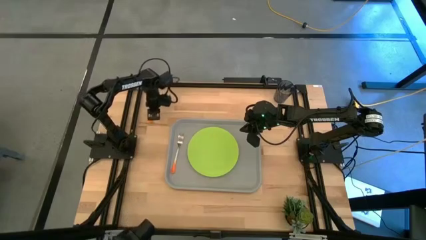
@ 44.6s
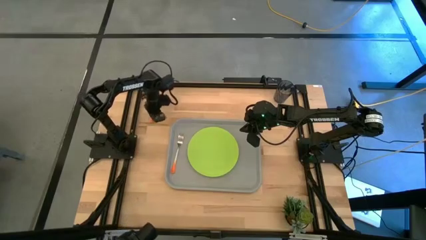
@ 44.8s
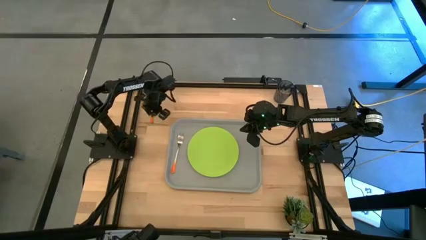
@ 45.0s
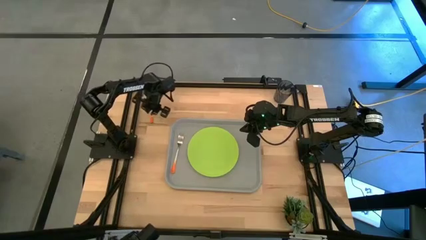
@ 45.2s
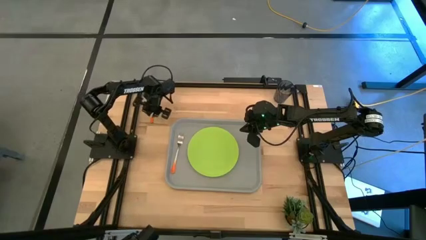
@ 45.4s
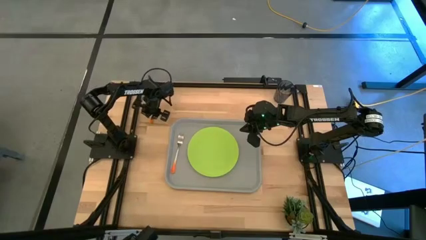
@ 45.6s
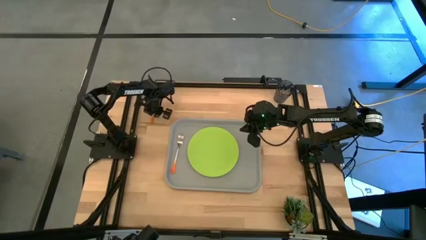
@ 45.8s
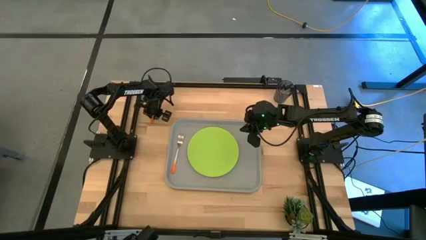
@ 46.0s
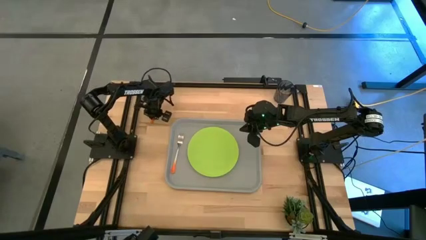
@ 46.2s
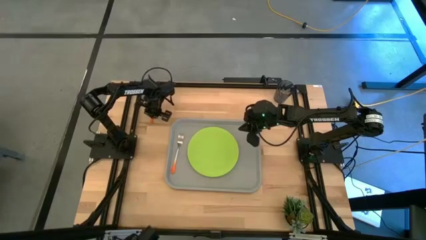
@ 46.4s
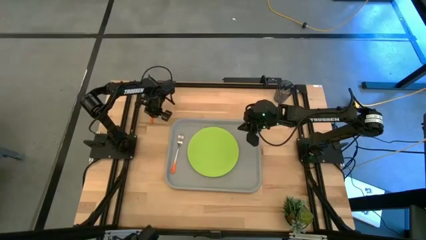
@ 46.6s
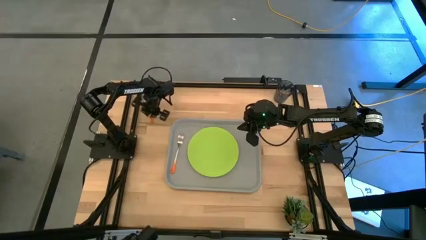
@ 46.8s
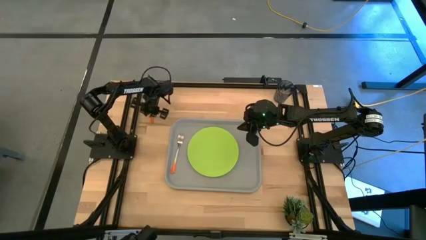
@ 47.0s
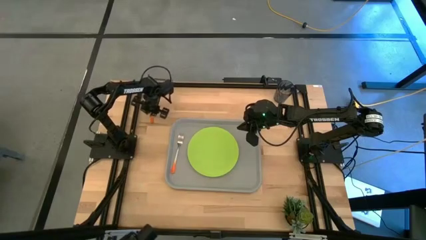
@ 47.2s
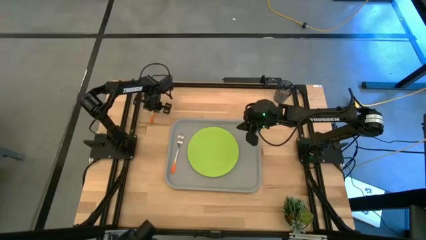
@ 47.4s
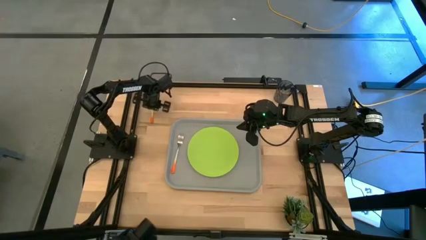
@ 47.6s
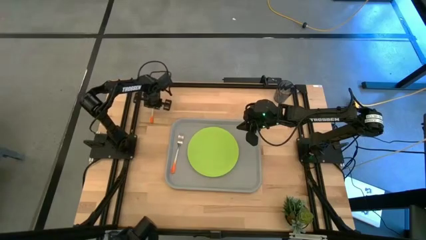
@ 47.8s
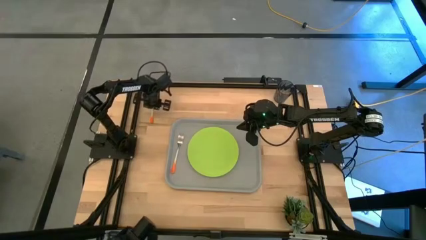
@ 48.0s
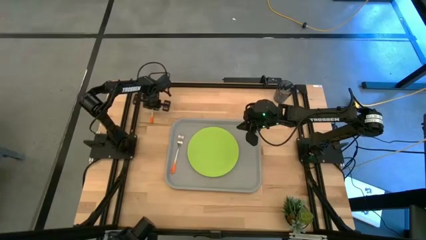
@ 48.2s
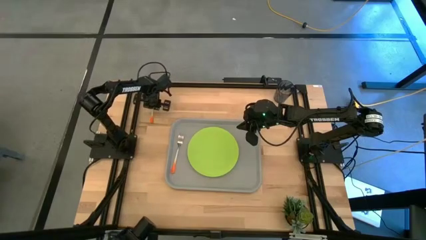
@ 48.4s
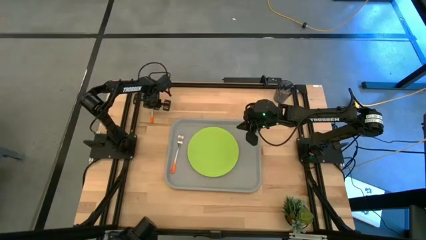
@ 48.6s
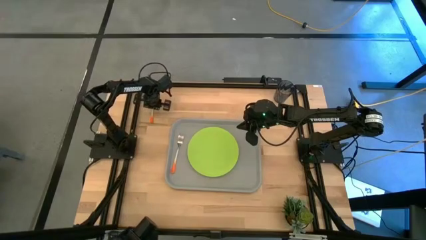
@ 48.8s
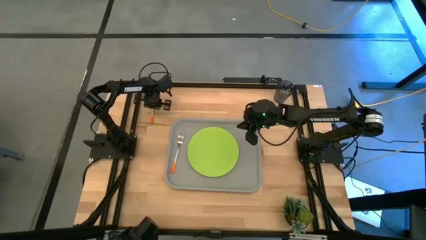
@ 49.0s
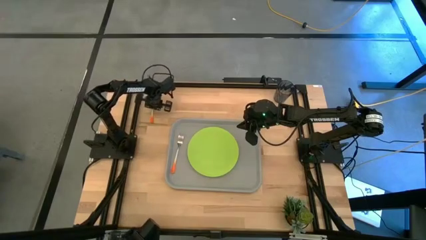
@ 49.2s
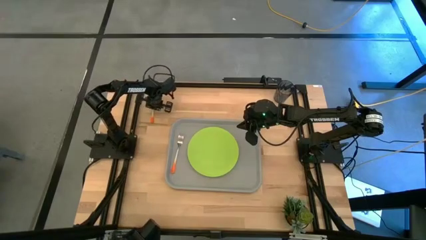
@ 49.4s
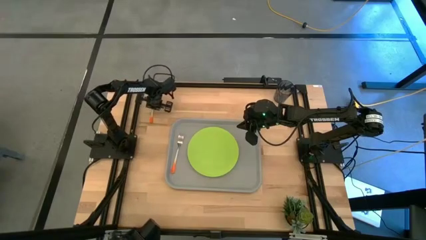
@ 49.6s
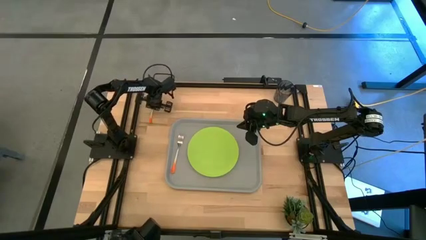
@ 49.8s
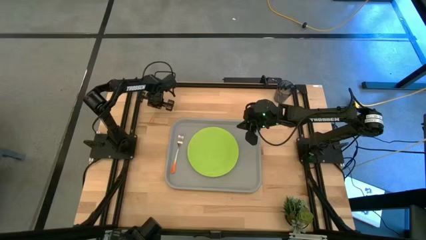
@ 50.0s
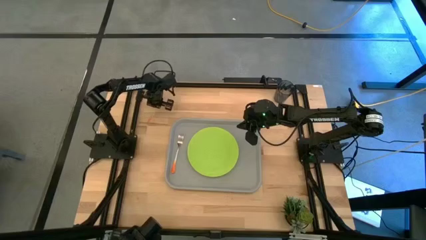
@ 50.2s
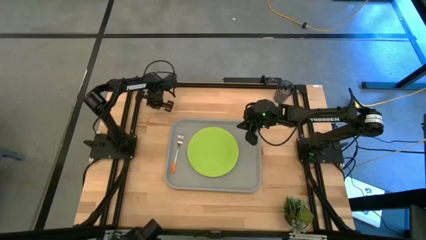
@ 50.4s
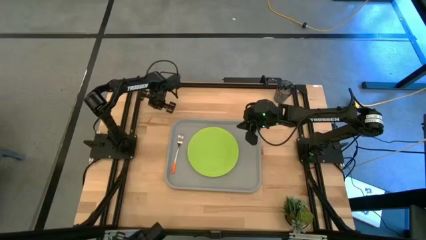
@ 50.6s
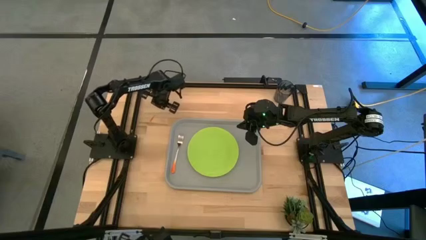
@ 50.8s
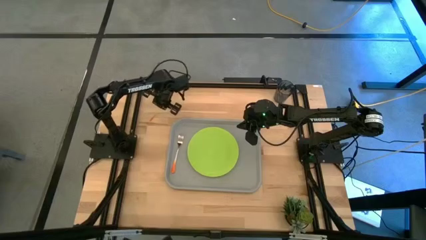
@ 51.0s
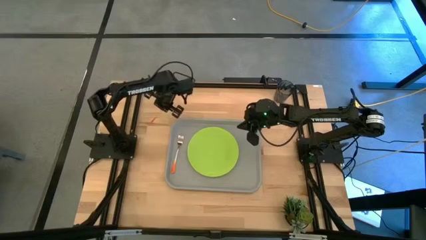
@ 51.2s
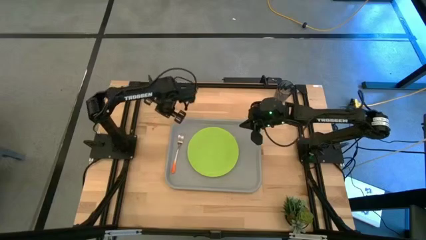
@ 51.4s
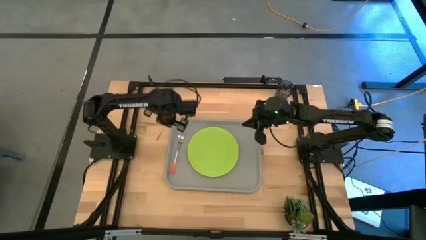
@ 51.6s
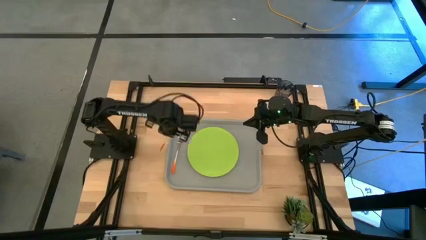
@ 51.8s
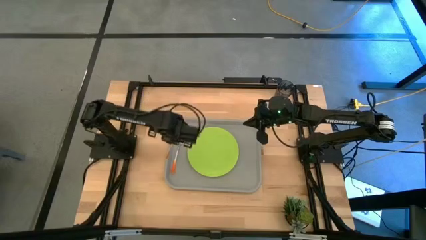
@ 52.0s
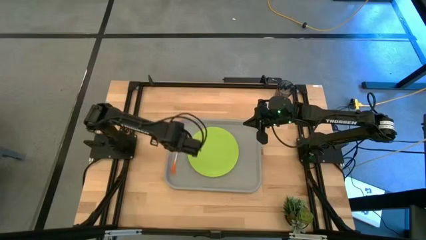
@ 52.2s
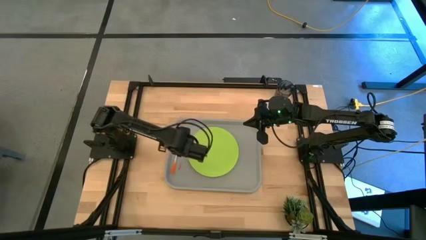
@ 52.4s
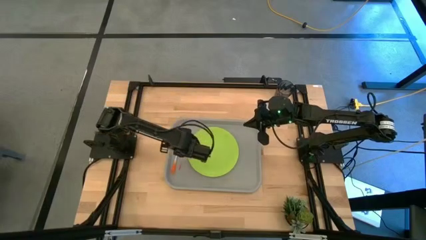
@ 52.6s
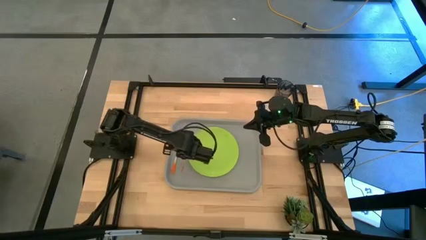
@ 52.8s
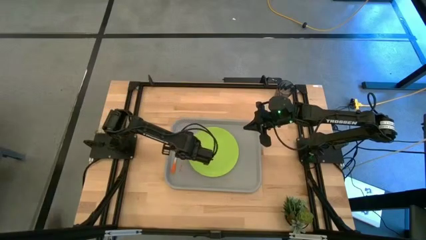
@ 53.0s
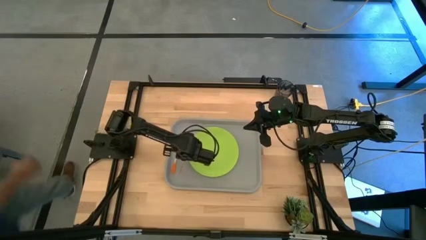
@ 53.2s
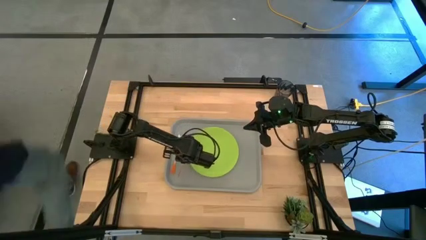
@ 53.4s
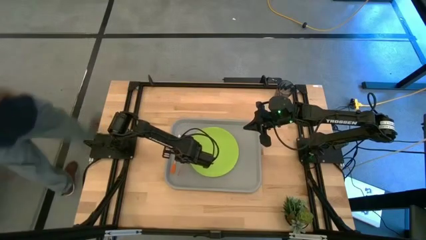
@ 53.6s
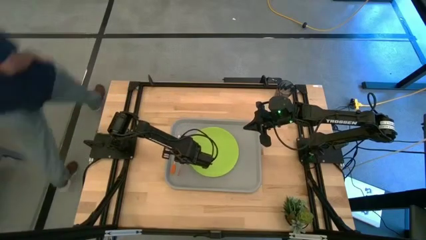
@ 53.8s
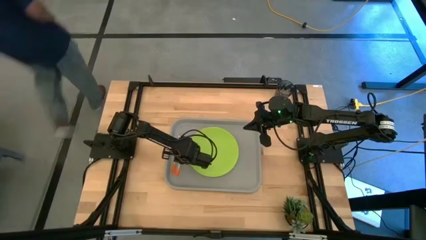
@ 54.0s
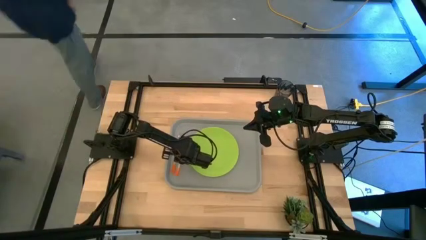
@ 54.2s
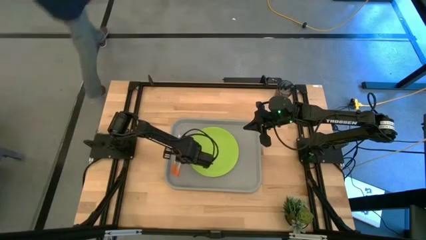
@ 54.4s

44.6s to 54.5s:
Task: Pick and place plate/cup/fork/spoon on tray
Put the orange spoon on the gray serving tray to the right side of the orange fork

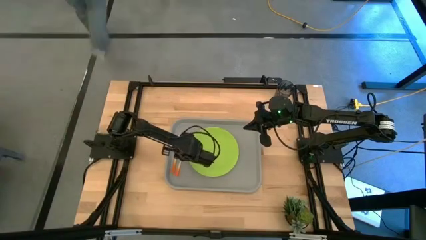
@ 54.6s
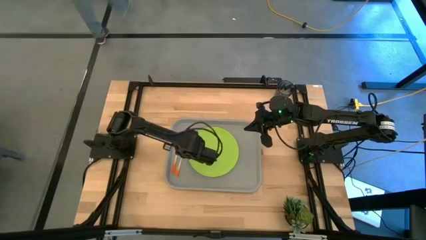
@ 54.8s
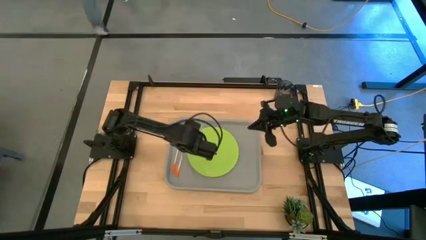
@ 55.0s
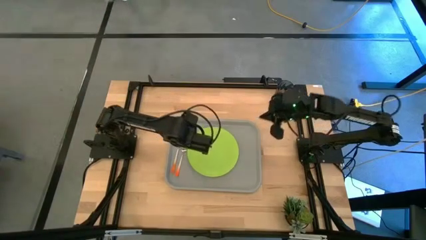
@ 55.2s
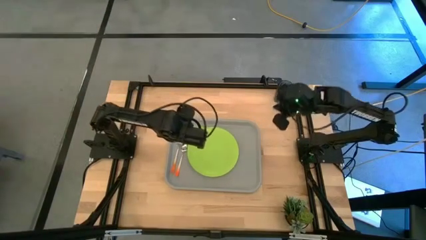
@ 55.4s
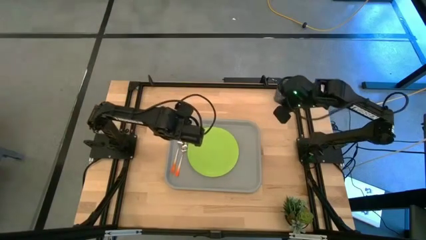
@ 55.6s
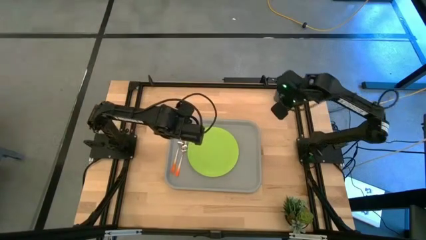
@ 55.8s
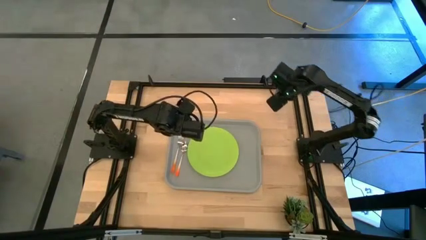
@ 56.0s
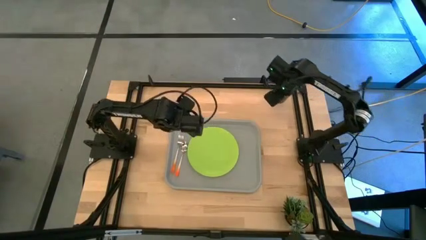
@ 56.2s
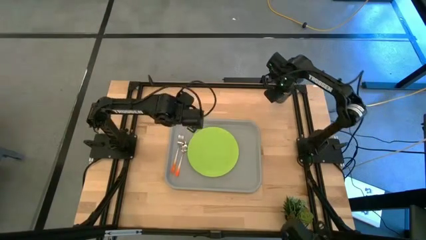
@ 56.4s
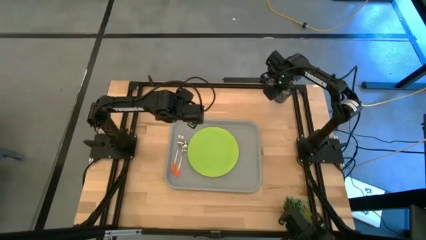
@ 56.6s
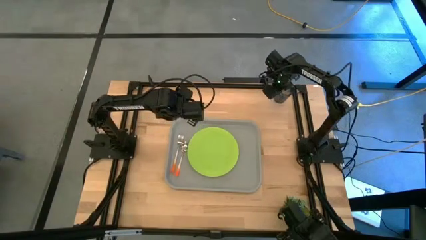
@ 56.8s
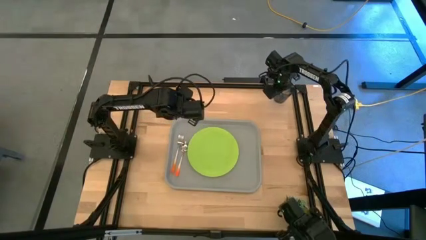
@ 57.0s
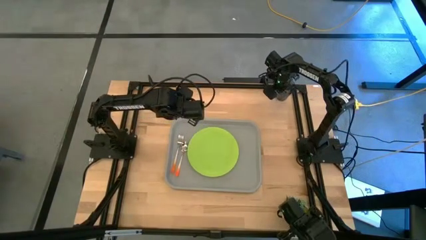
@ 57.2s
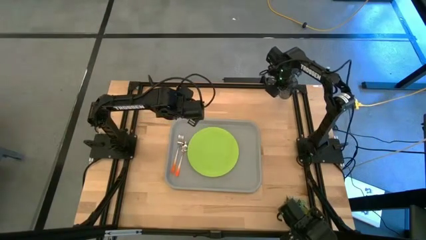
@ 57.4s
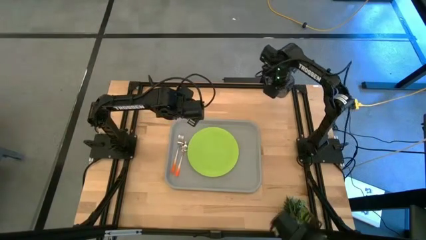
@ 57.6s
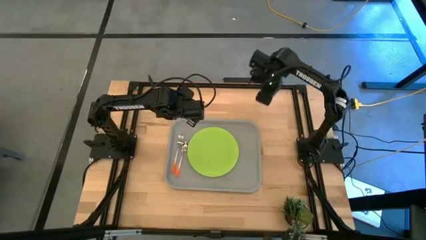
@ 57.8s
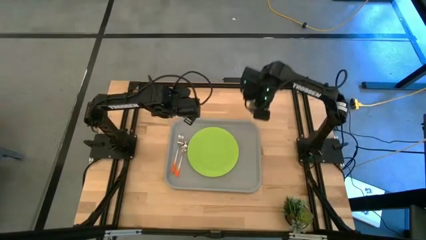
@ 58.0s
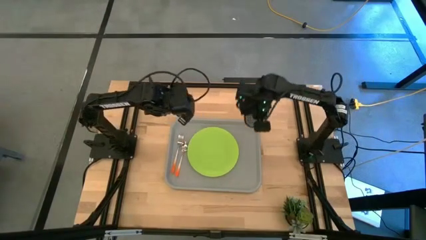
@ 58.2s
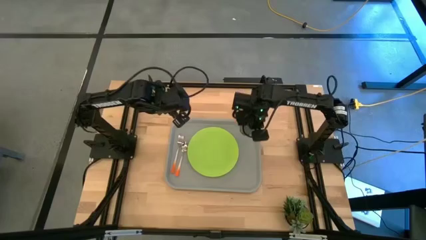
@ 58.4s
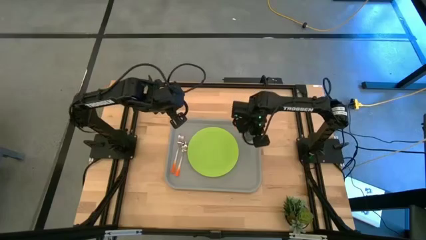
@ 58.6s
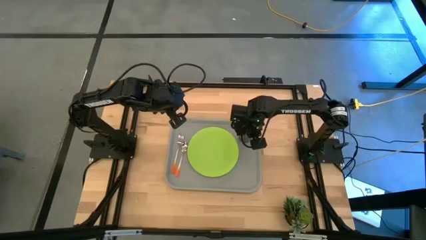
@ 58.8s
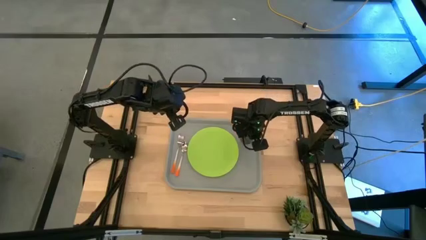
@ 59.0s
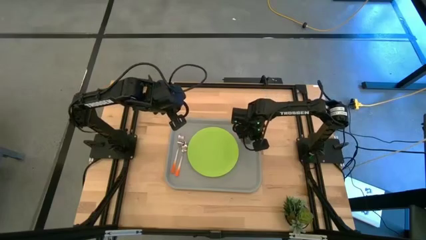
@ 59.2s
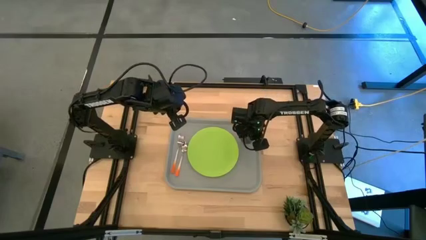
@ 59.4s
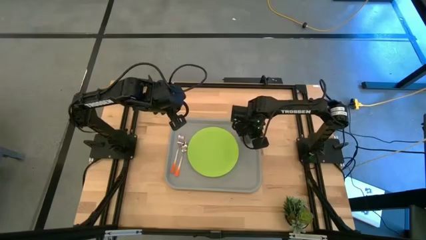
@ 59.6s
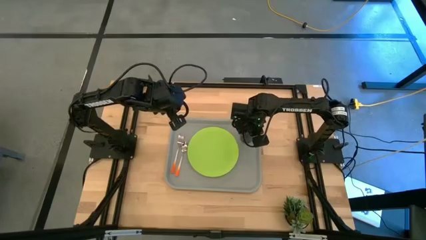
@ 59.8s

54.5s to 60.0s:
Put the blue glass on the gray serving tray to the top right of the green plate
